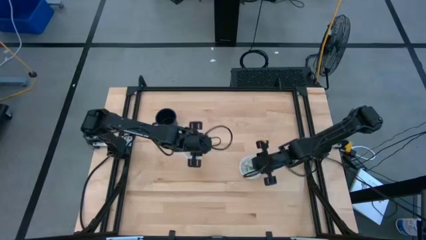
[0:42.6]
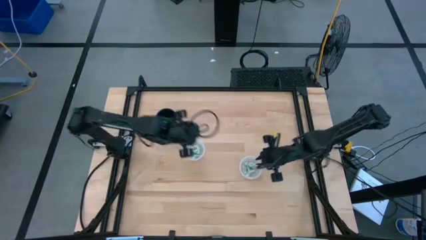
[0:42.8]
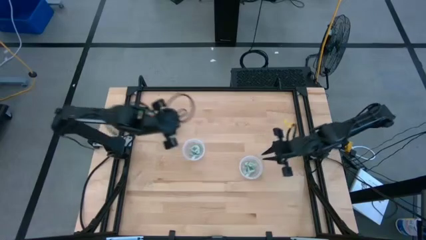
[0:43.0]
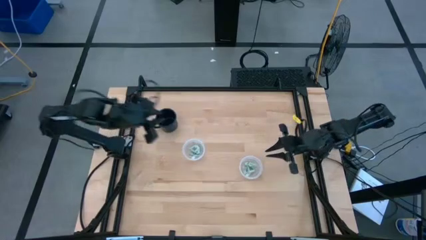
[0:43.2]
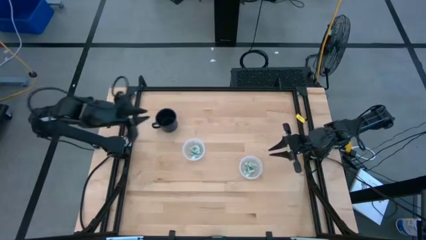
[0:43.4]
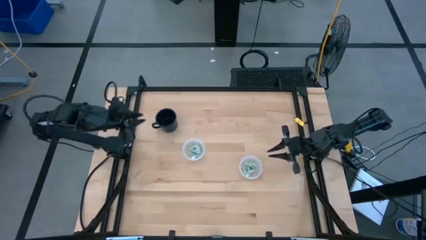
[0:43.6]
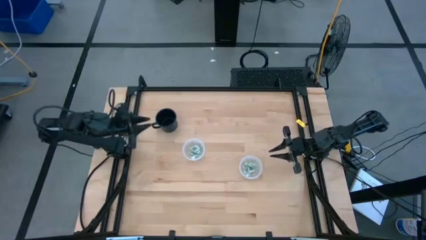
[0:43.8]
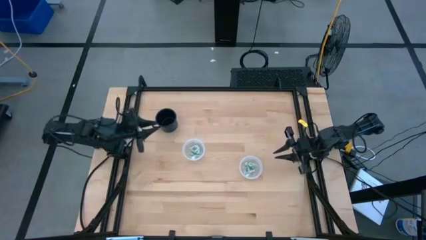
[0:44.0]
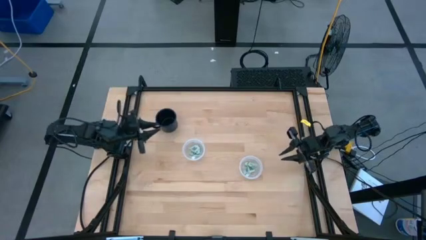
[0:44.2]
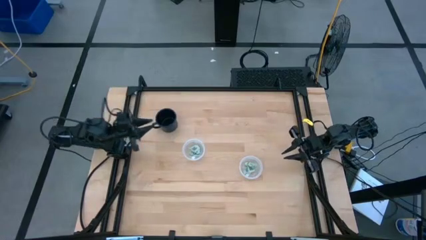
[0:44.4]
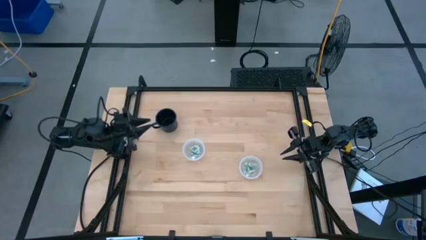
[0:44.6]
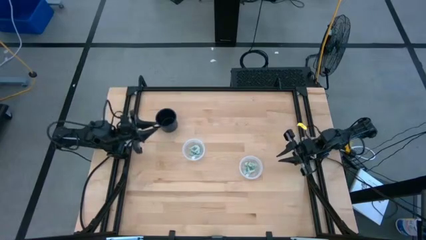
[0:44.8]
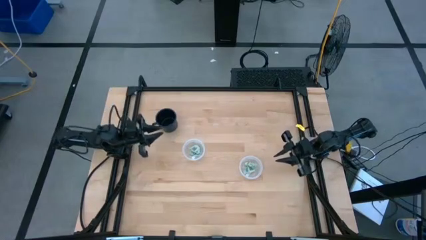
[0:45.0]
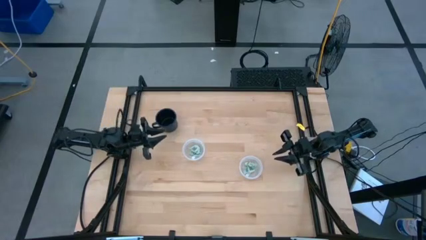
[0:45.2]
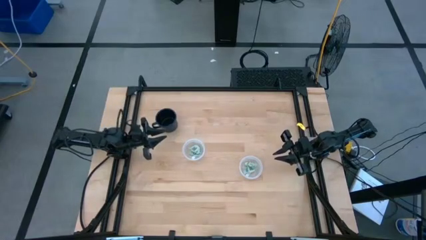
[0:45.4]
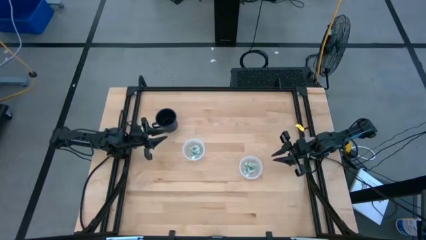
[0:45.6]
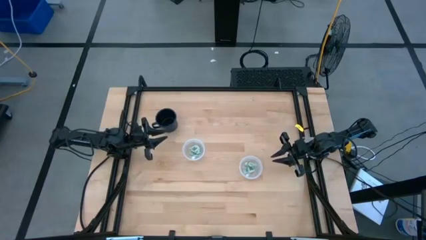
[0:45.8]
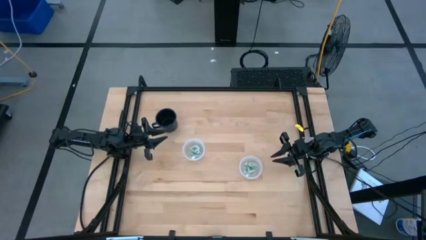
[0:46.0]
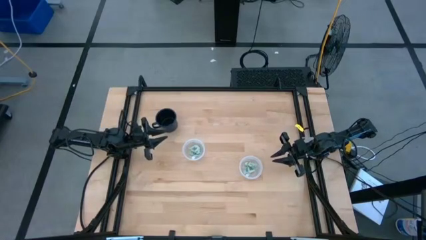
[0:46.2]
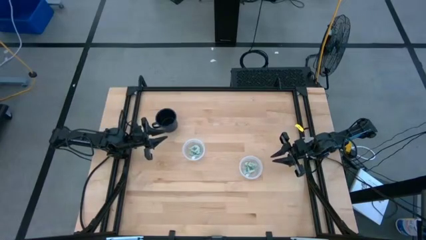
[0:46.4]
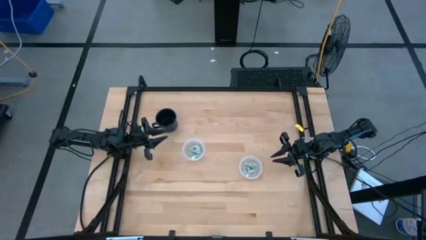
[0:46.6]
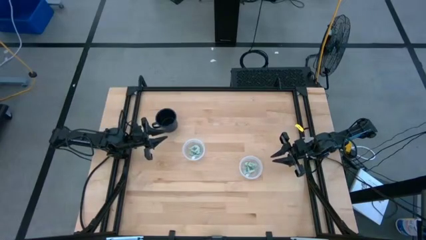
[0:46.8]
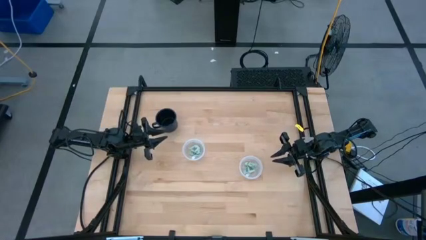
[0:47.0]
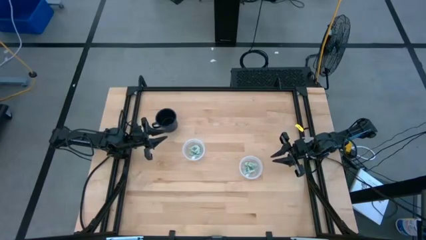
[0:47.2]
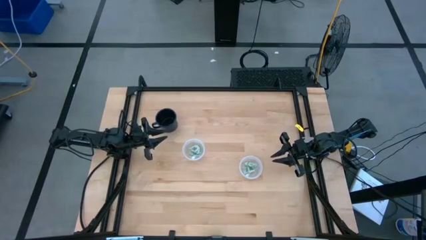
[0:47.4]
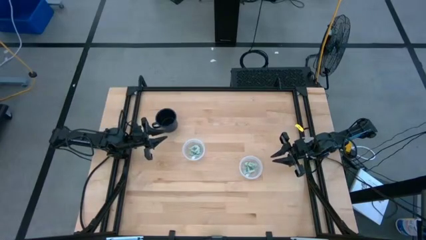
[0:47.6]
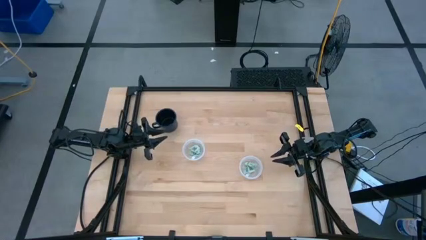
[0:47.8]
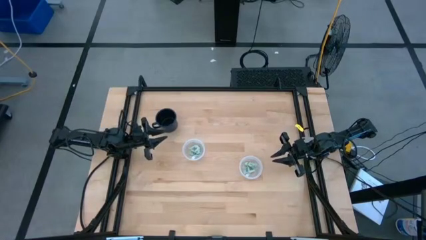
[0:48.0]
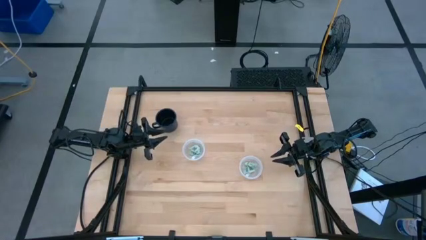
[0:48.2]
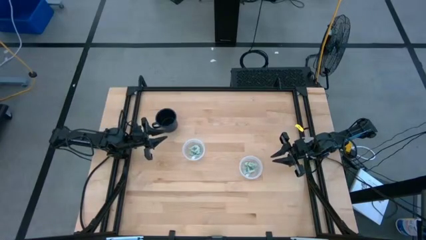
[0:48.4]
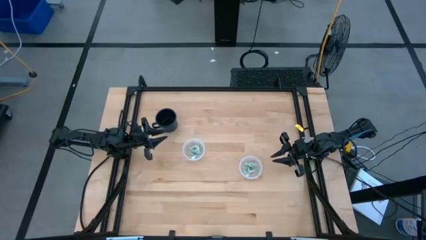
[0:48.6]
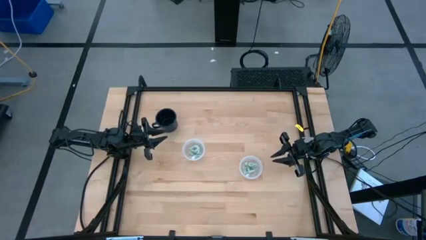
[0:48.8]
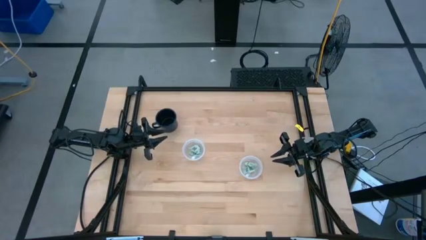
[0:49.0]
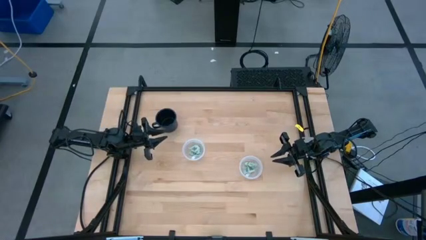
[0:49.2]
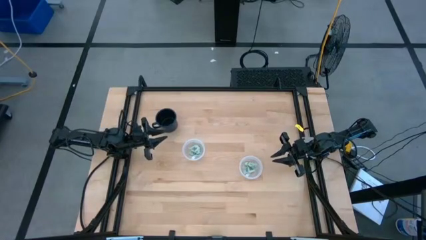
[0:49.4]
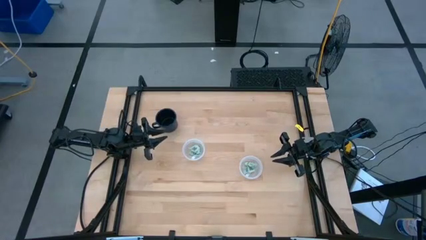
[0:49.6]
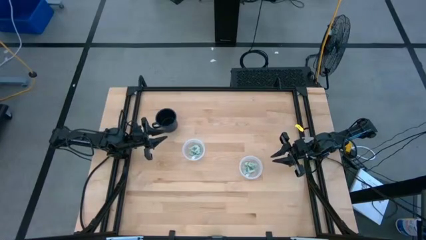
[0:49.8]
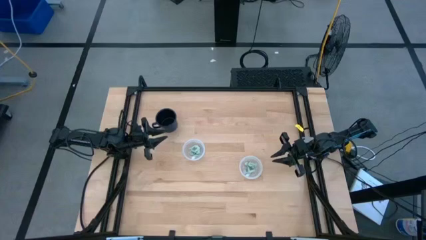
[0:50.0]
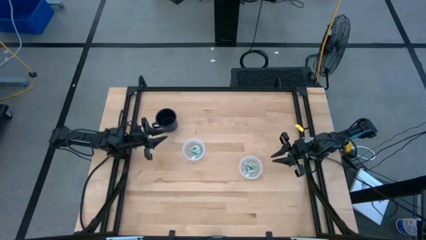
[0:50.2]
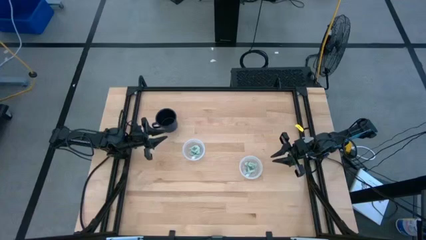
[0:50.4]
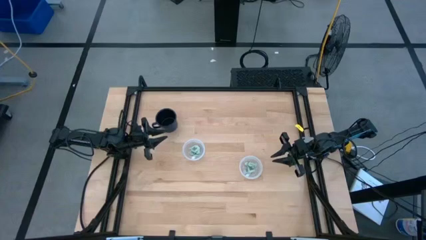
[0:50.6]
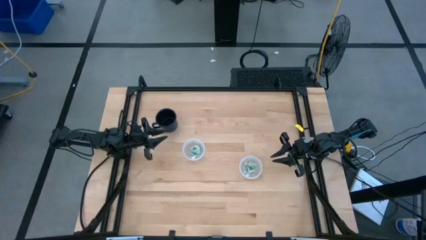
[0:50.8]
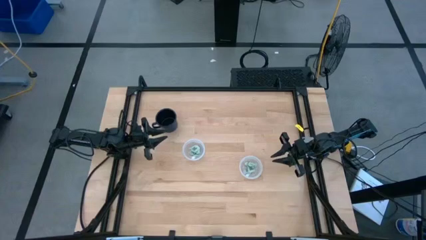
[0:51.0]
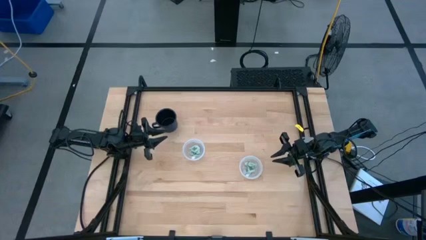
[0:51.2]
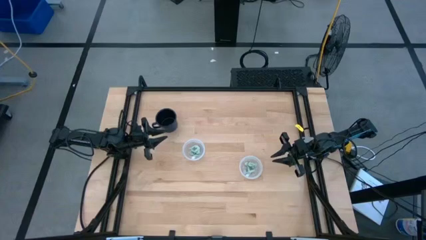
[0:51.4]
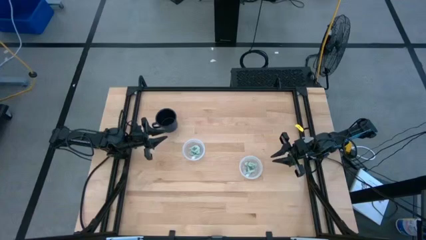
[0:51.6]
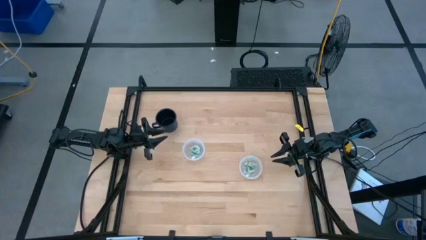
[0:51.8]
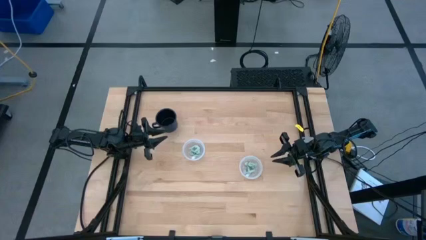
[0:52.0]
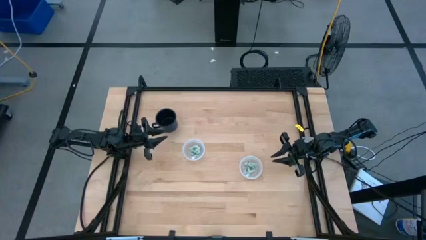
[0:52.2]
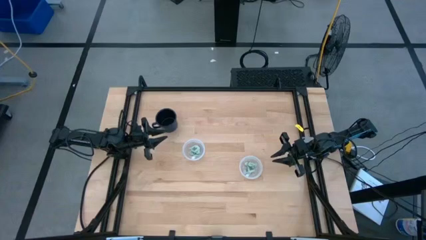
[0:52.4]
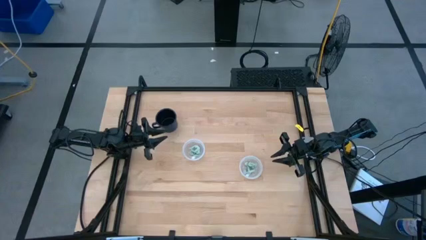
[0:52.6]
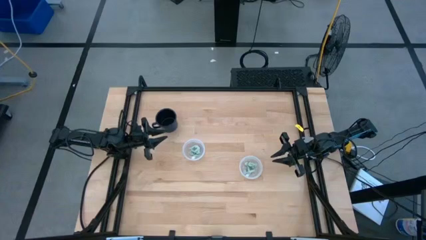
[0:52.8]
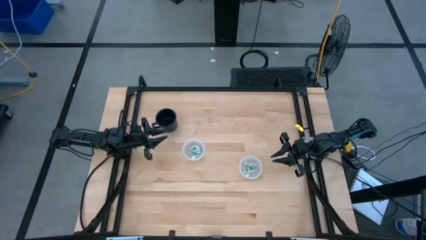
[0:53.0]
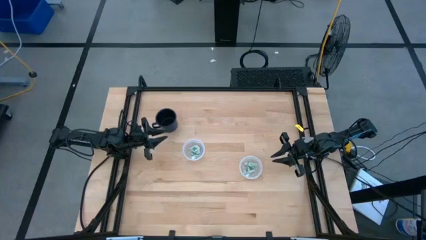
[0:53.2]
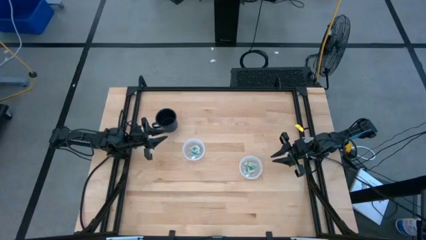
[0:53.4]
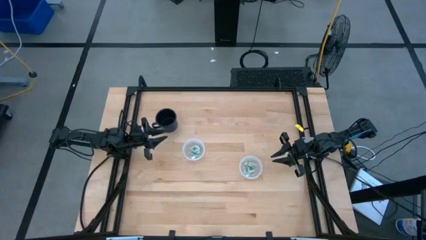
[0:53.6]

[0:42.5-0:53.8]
Task: Pick and place Stevia / Truvia into bins
Return to Home Position

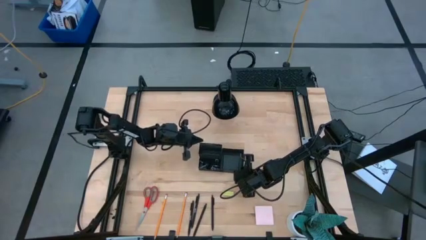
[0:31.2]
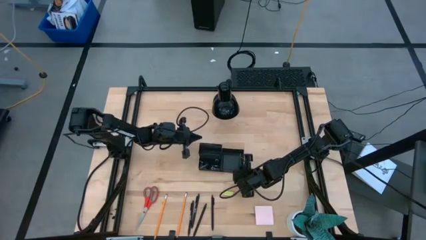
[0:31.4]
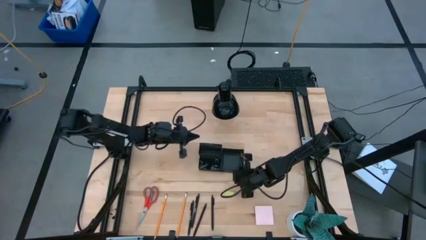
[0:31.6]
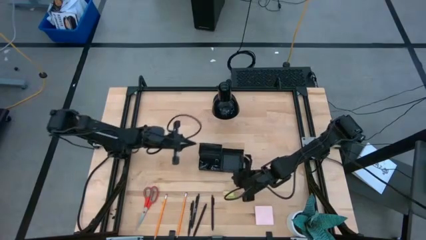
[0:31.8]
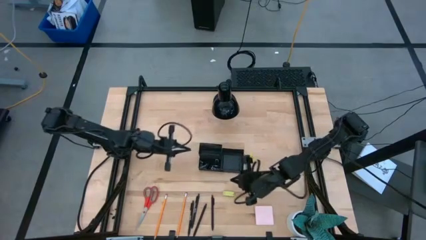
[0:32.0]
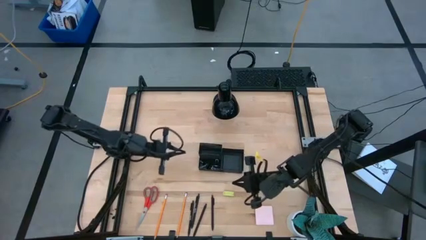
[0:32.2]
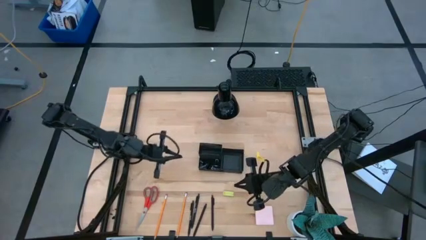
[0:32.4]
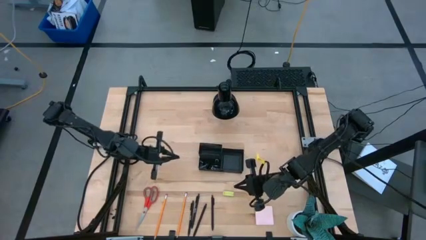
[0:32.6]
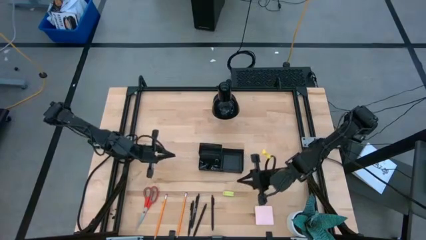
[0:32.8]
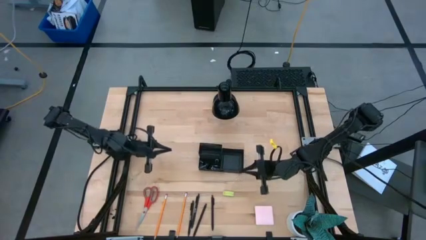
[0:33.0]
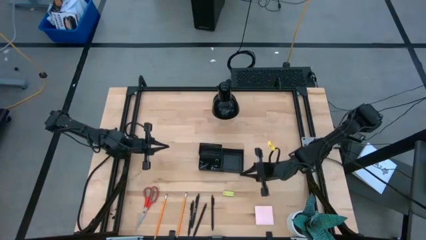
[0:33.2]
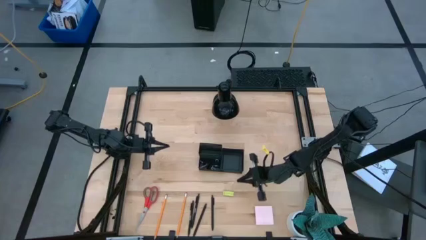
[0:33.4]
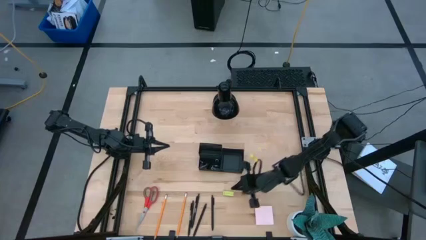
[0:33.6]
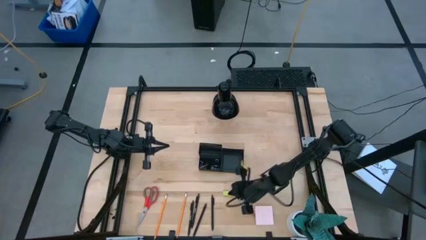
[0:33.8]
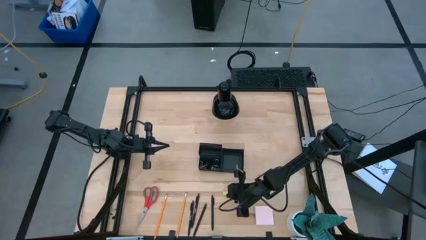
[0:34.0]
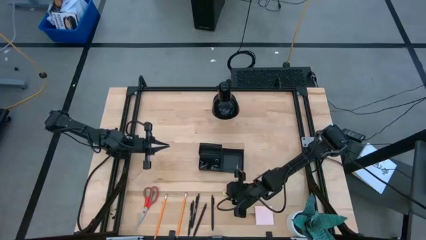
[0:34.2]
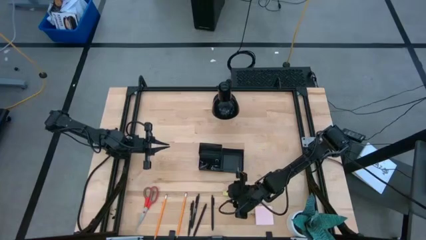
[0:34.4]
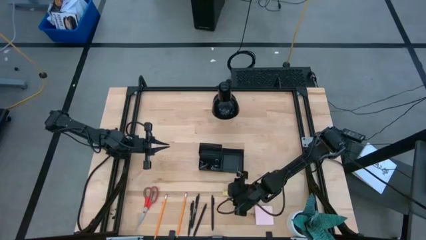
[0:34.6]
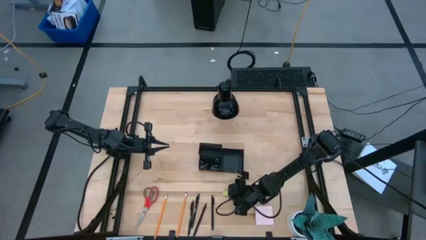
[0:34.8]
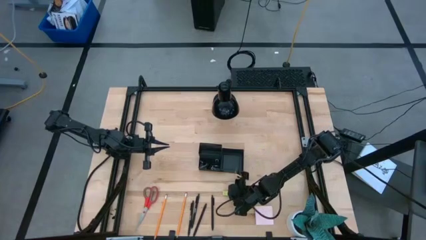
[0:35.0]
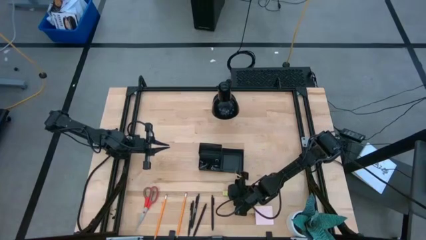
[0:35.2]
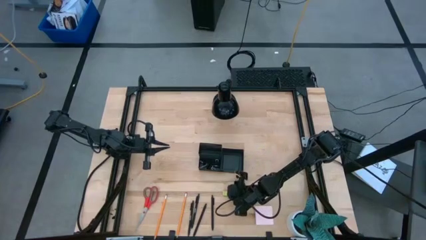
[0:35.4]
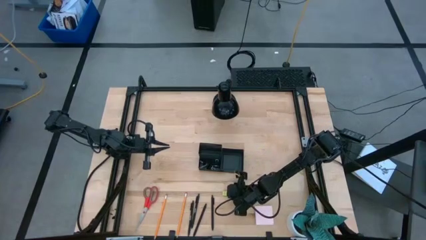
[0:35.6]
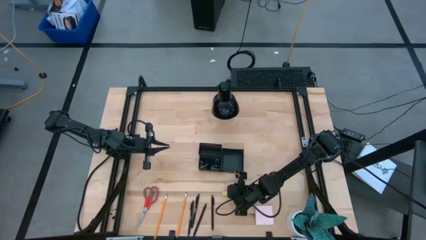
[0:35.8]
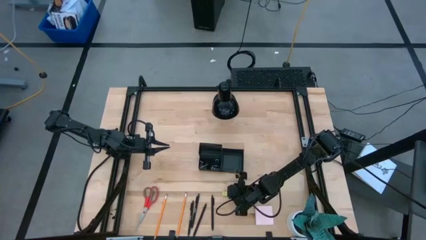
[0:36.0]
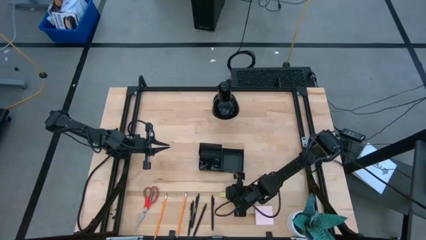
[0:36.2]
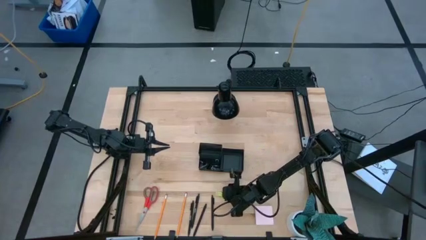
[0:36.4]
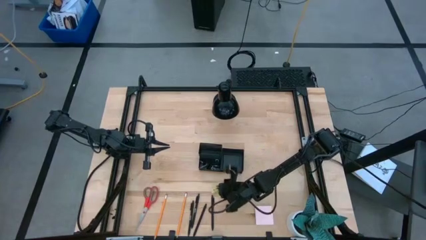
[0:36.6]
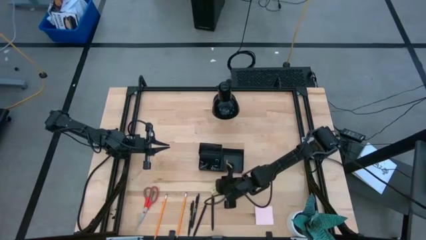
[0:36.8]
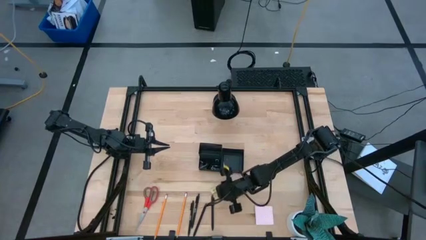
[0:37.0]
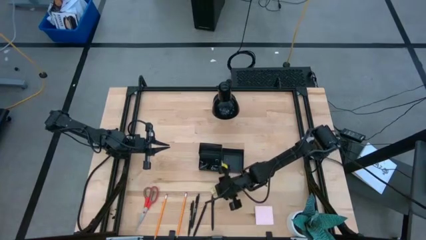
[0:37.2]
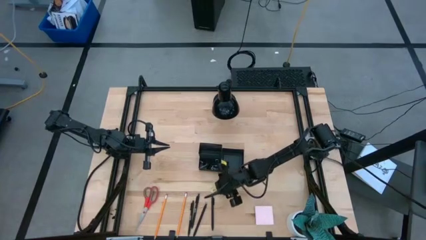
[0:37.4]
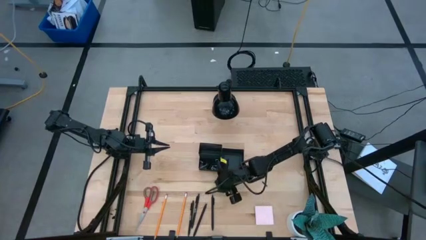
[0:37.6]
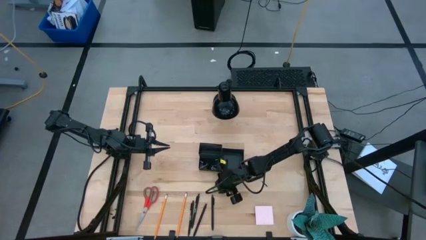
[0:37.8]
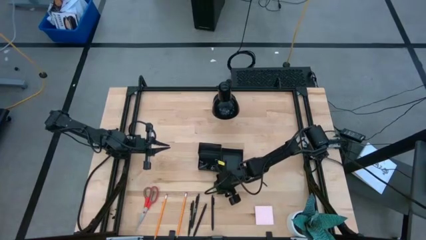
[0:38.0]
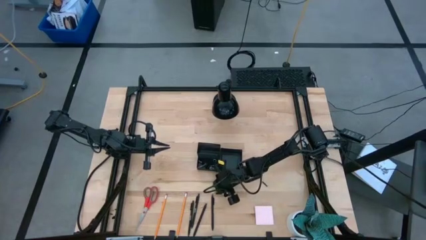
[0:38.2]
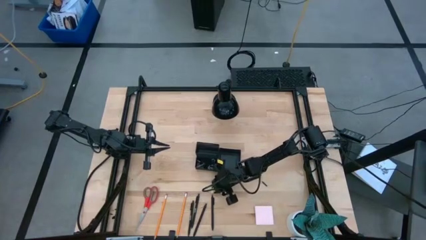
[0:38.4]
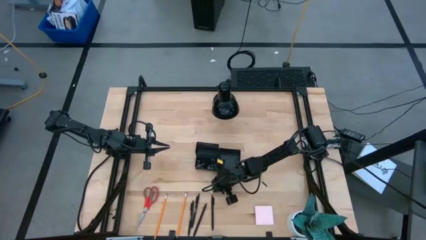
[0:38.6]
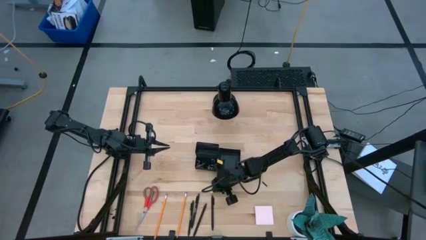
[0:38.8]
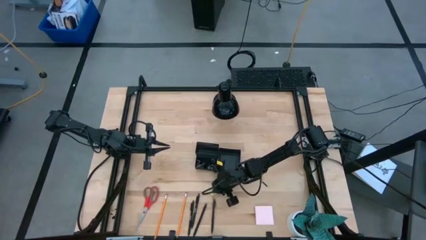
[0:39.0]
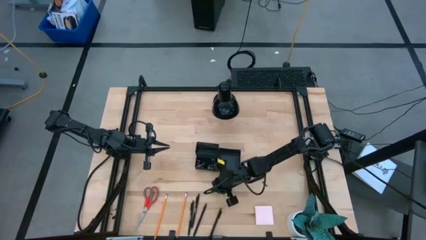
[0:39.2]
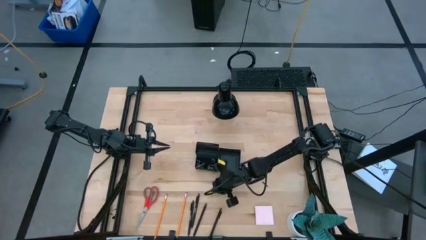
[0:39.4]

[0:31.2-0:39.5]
Task: Pick and place office supplies into organizer
Put the eraser into the bottom left section of the desk organizer
